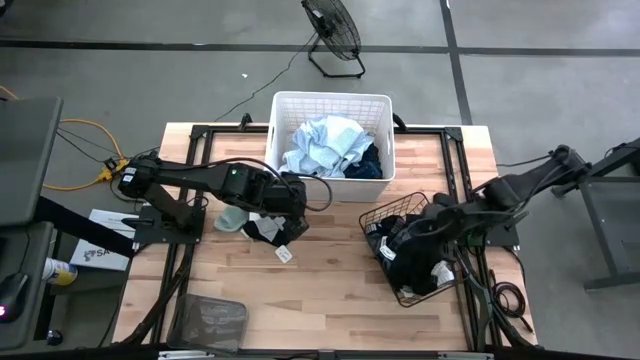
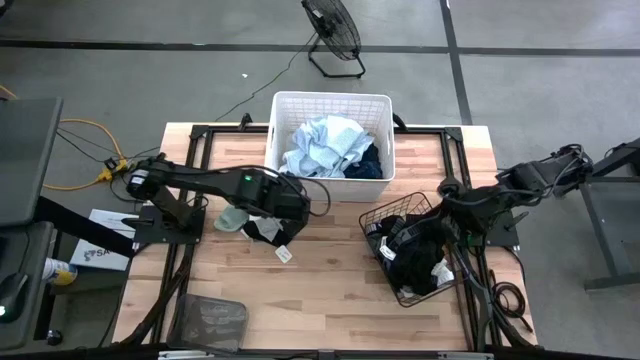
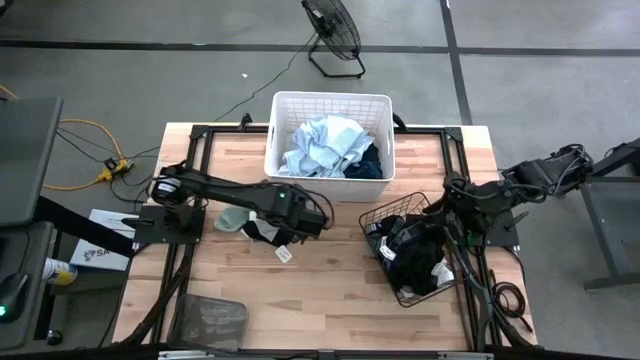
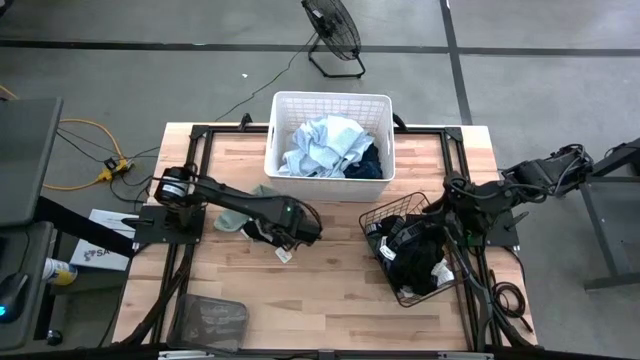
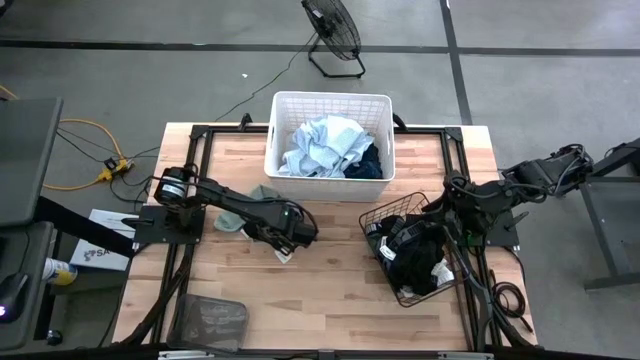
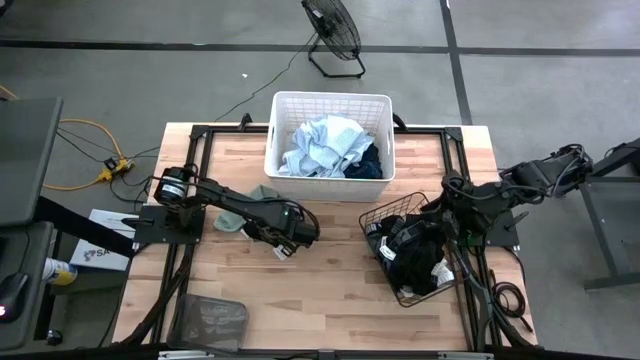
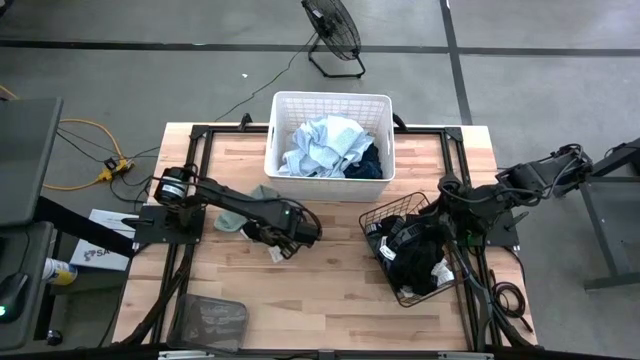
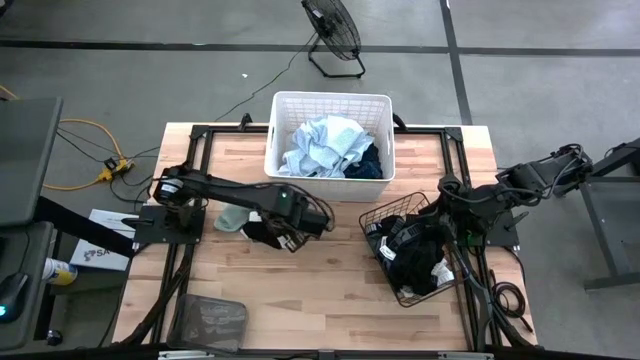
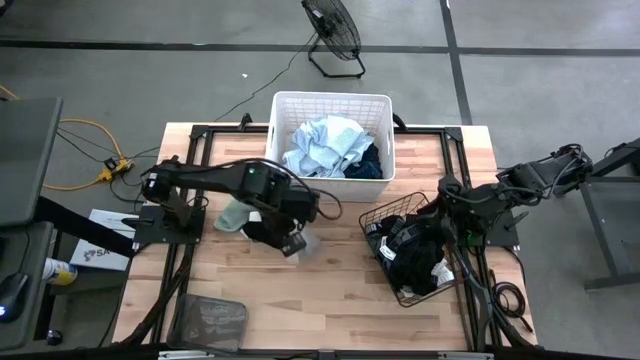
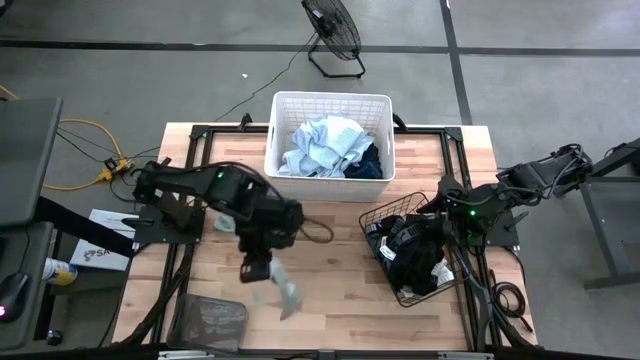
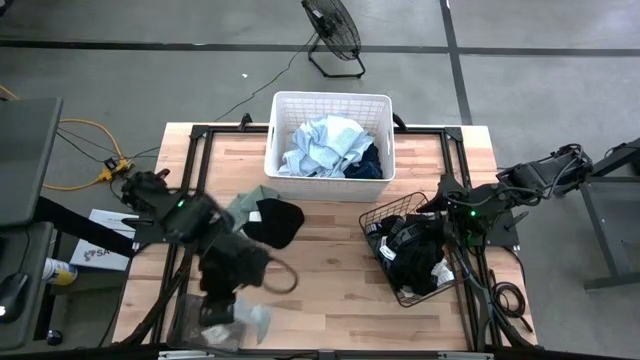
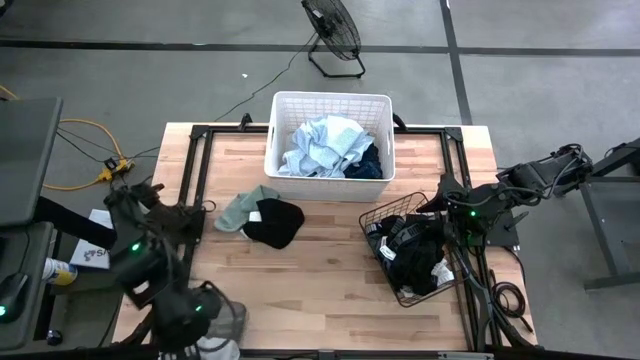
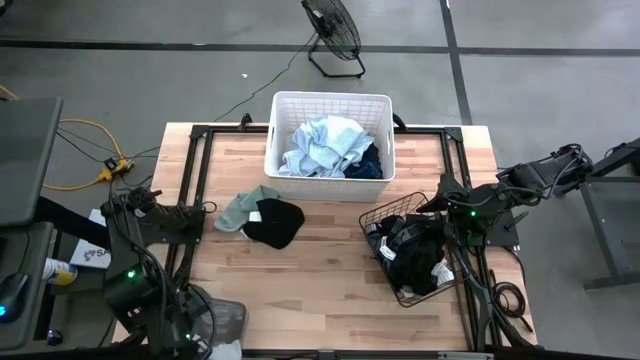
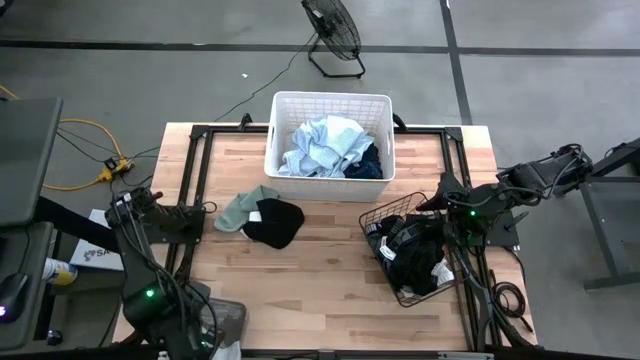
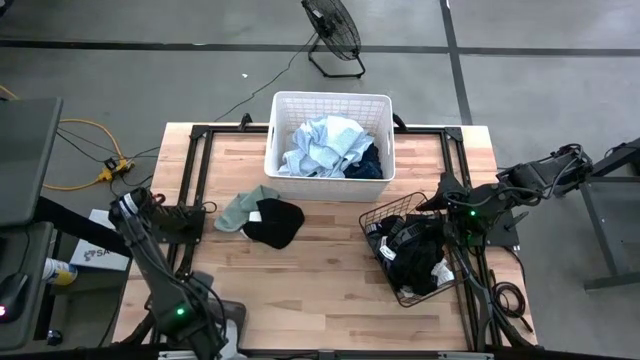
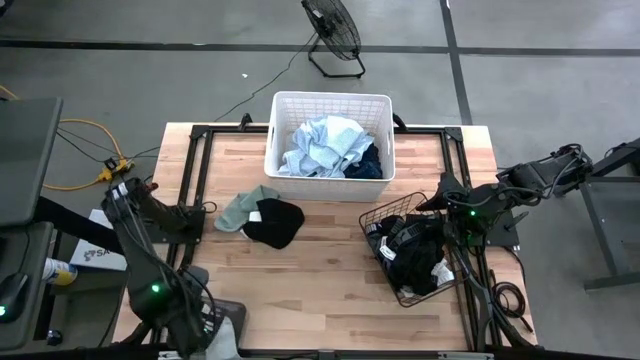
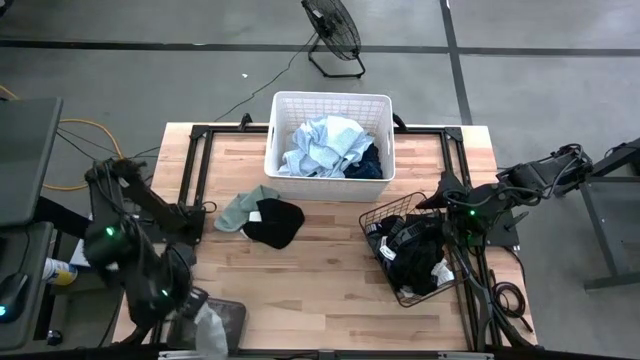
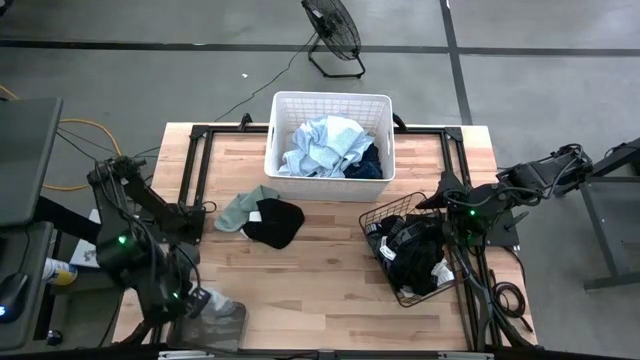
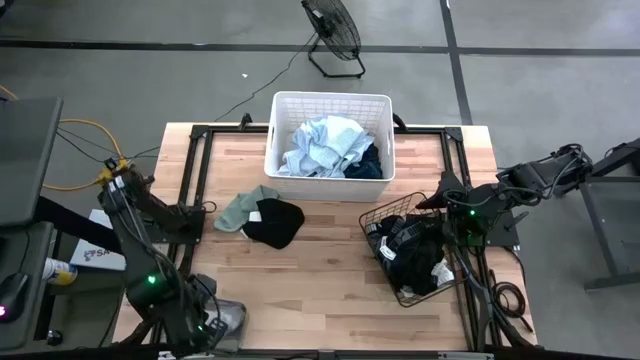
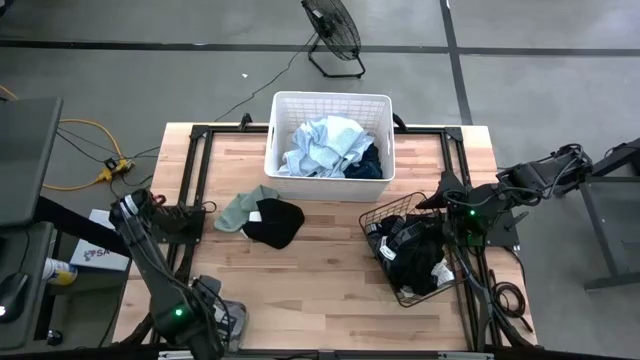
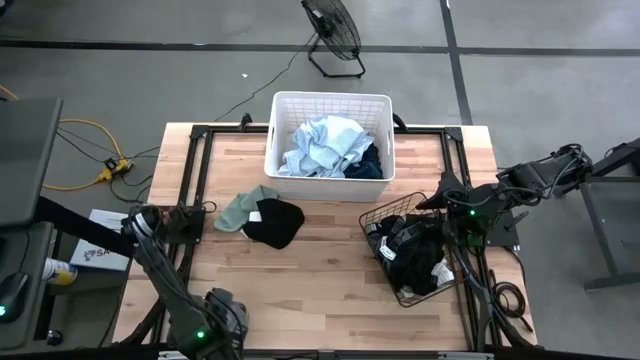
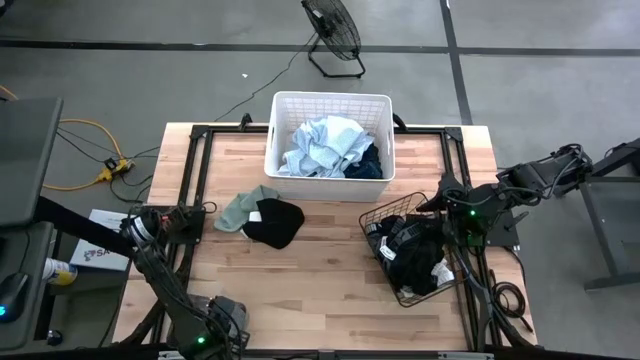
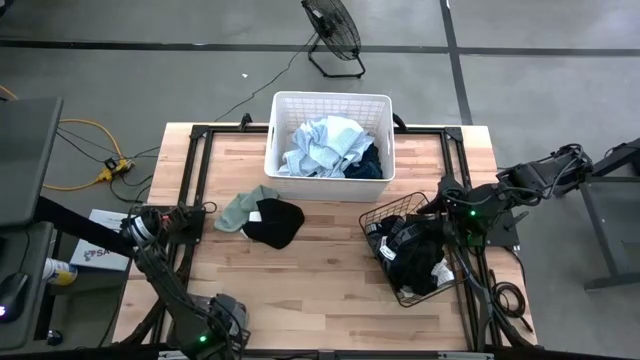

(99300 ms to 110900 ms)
Task: Pick & Place Cloths
Put the light gray sock into the black bin

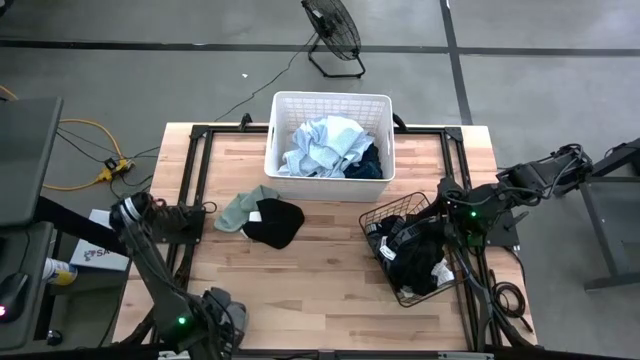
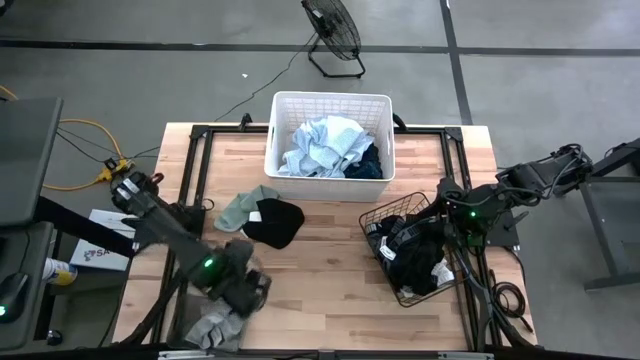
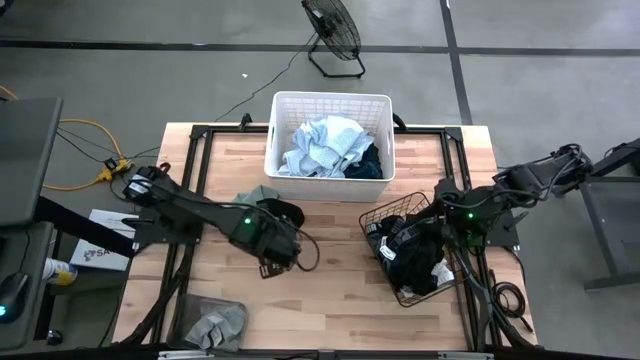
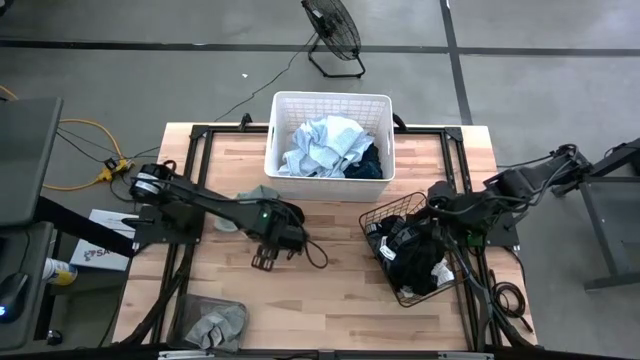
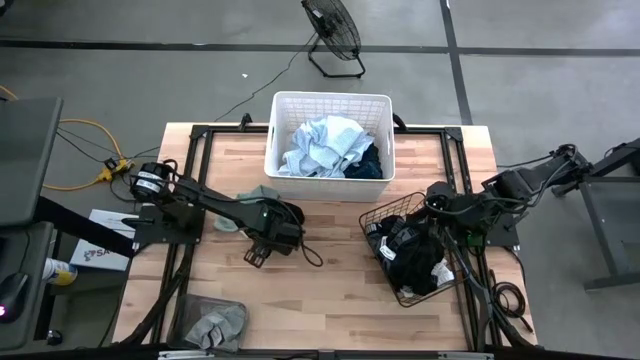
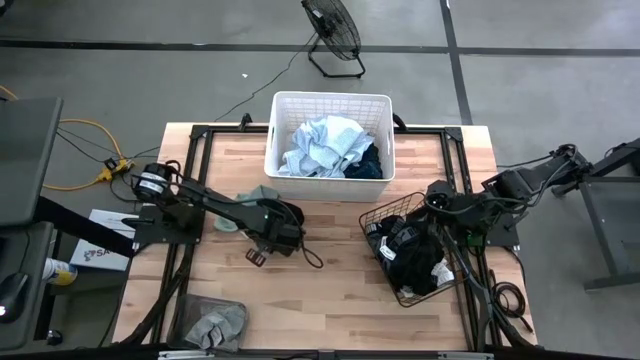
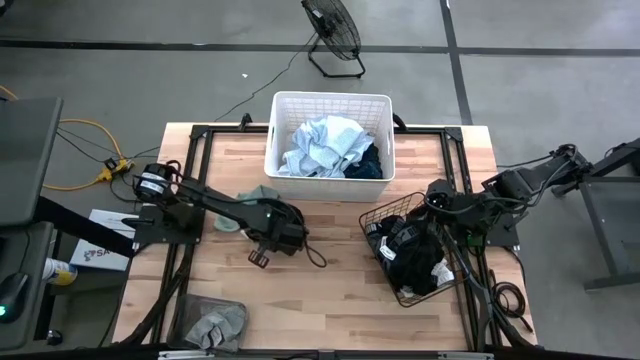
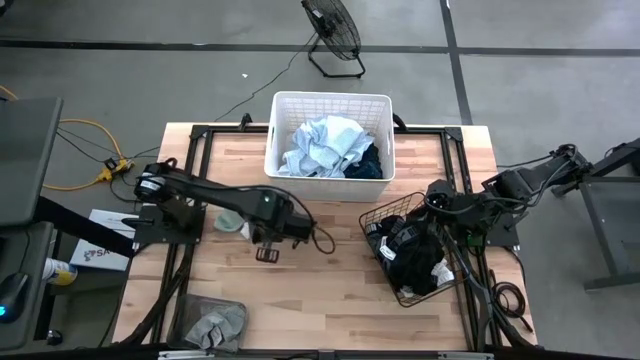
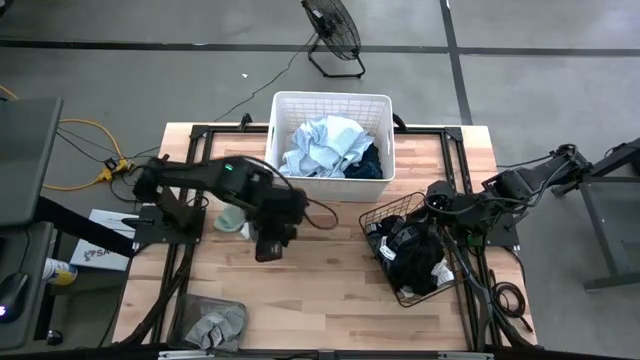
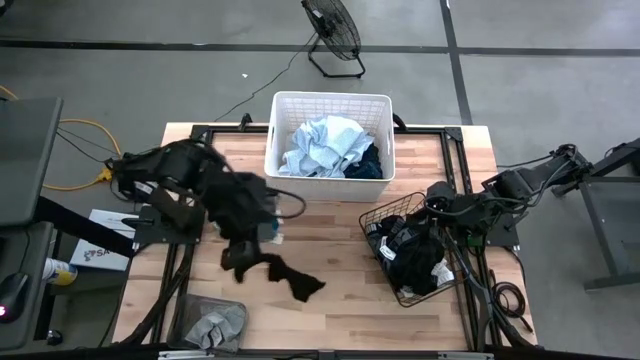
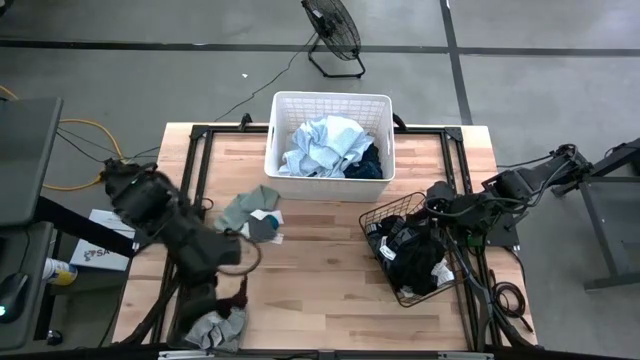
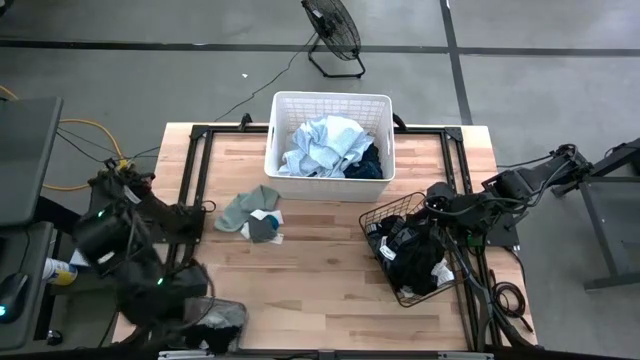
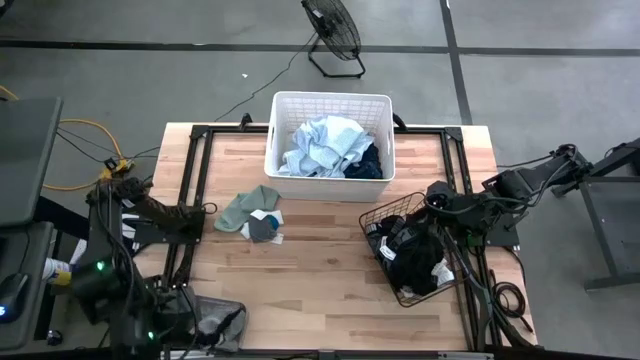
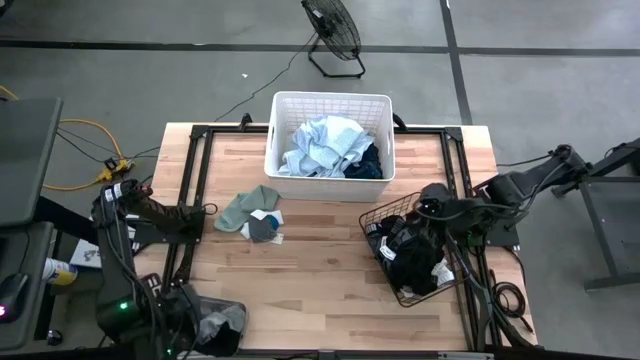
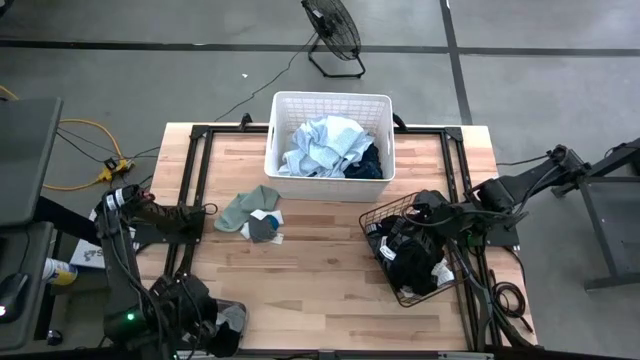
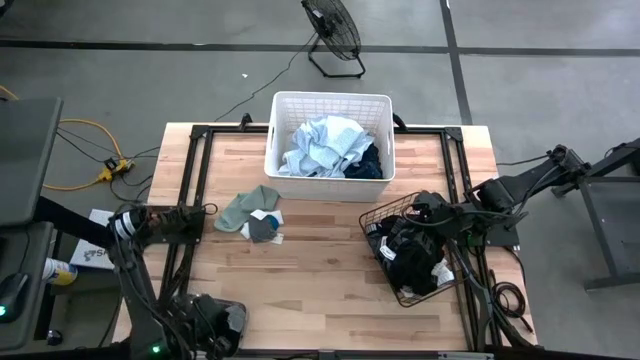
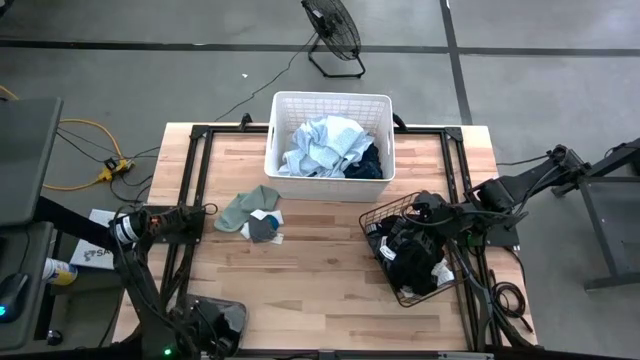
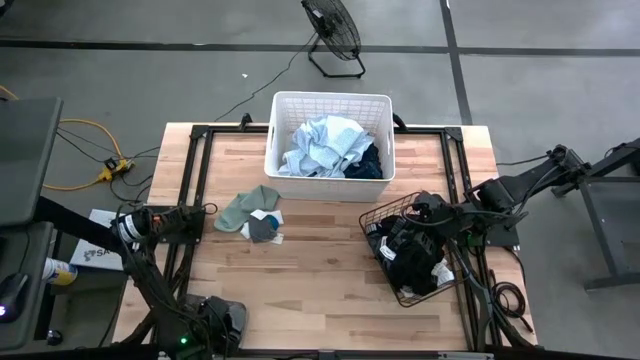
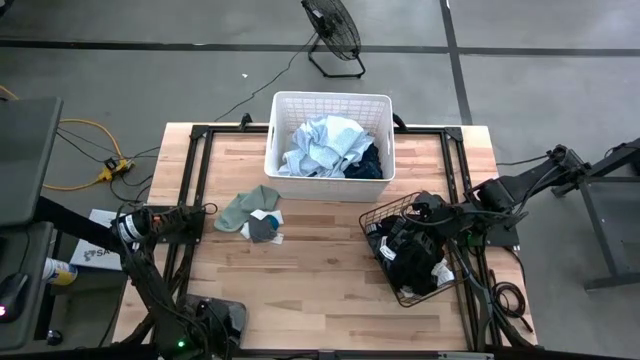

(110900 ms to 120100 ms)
Put the black sock into the black bin

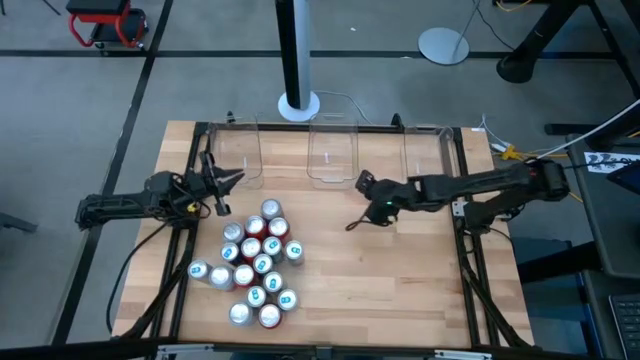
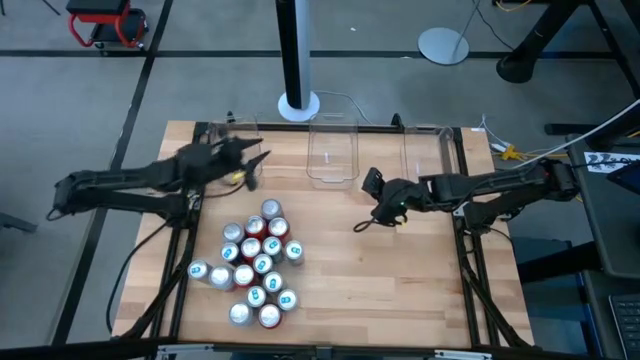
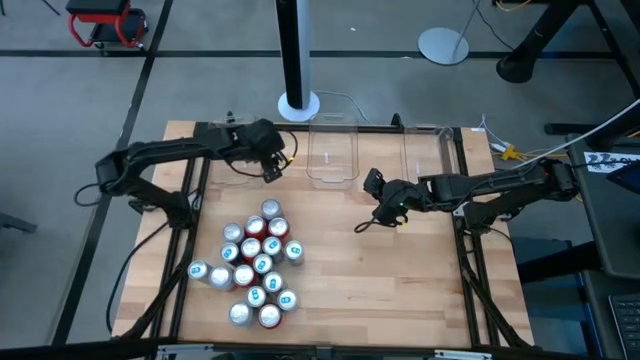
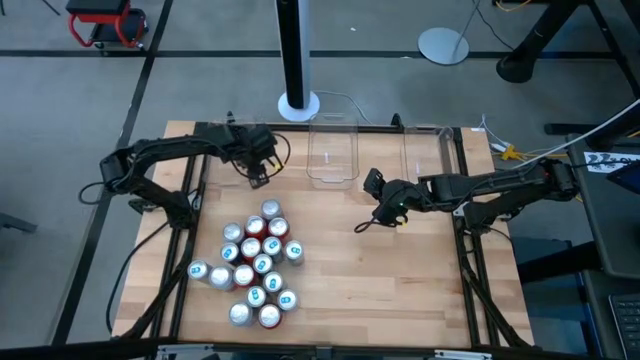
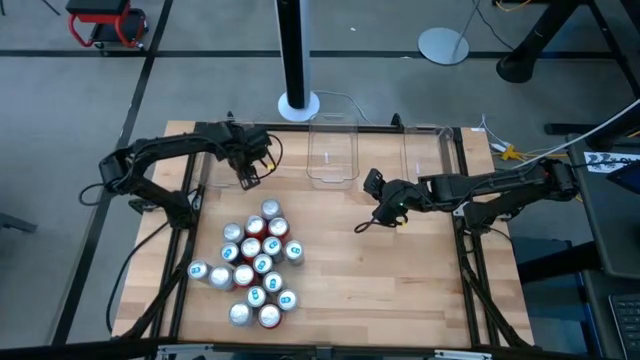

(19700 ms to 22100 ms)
Task: Sort soda cans
Adjust the top left transparent bin
